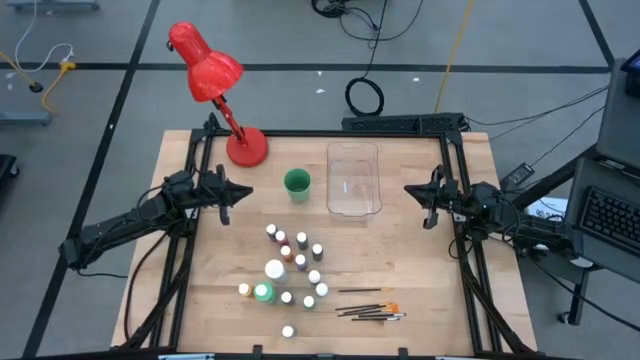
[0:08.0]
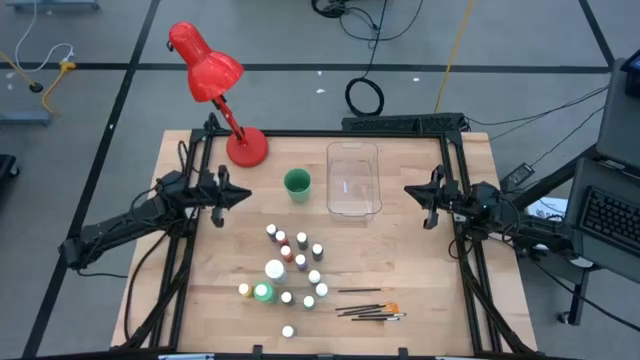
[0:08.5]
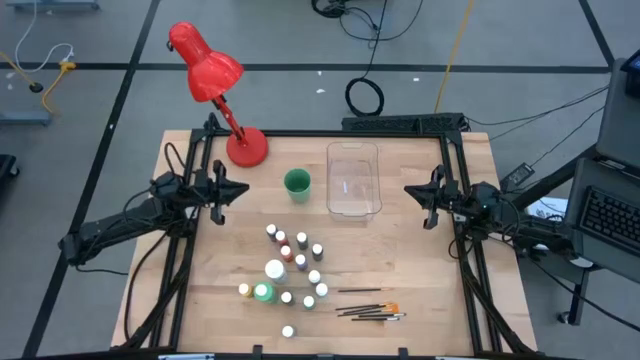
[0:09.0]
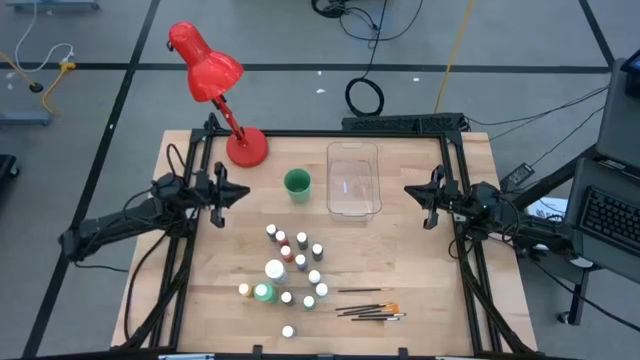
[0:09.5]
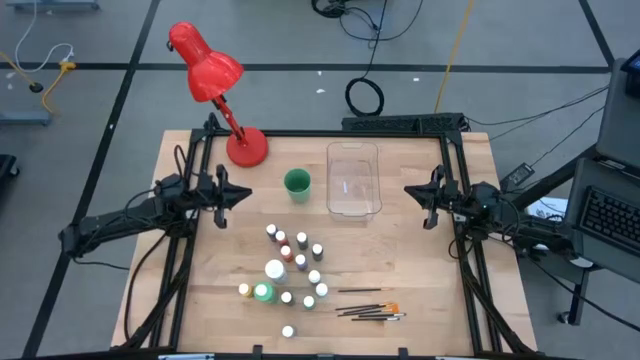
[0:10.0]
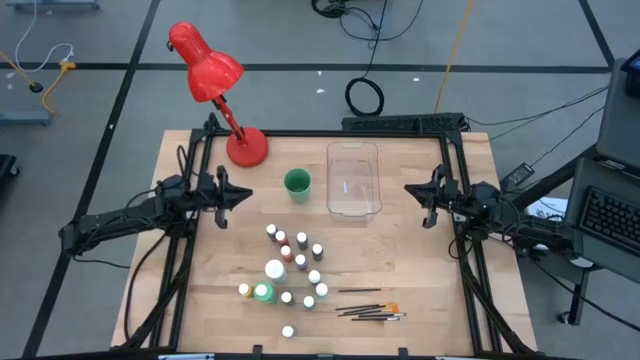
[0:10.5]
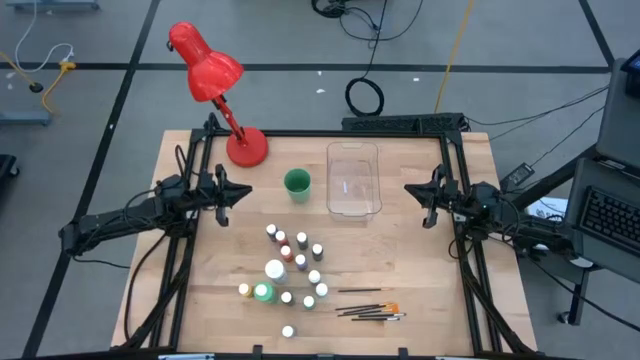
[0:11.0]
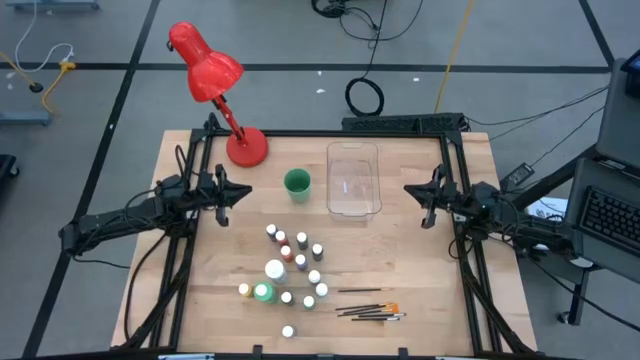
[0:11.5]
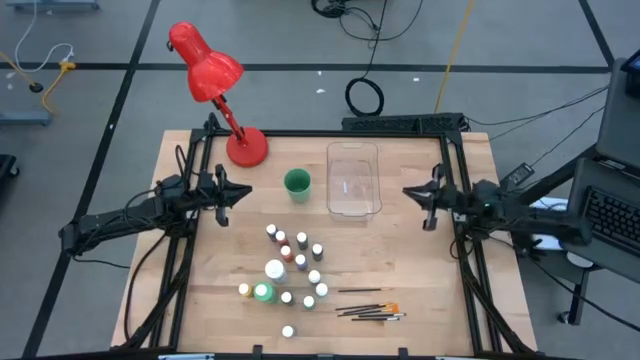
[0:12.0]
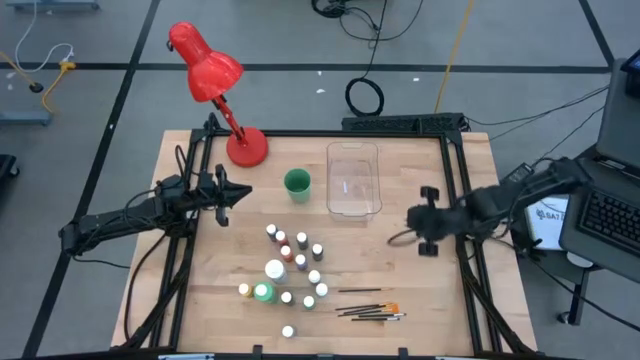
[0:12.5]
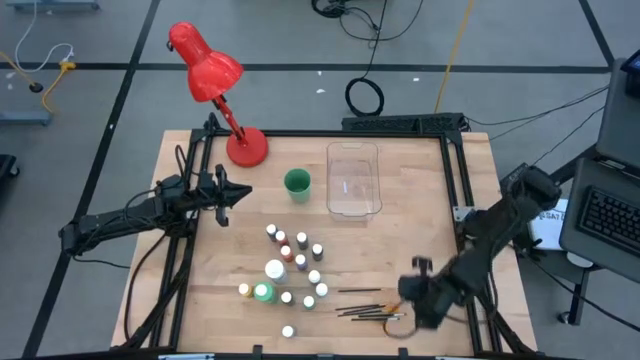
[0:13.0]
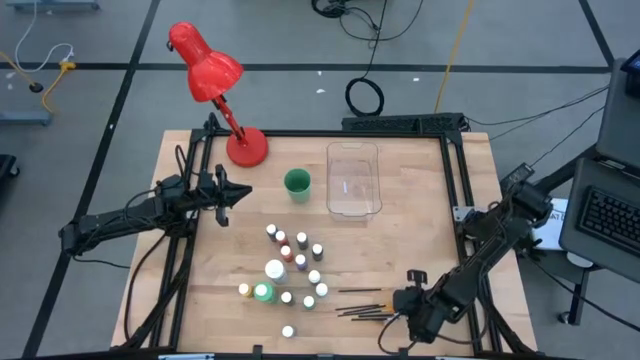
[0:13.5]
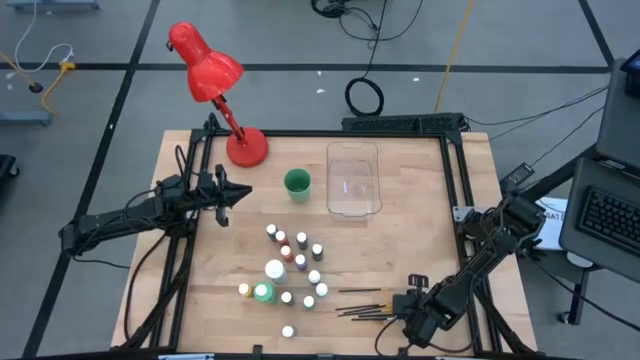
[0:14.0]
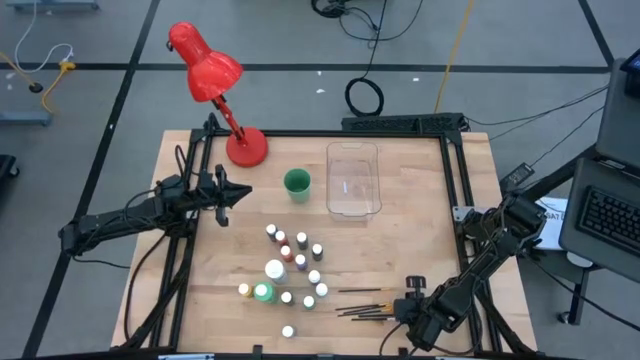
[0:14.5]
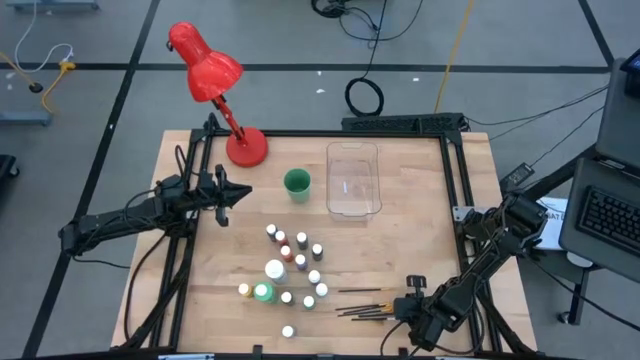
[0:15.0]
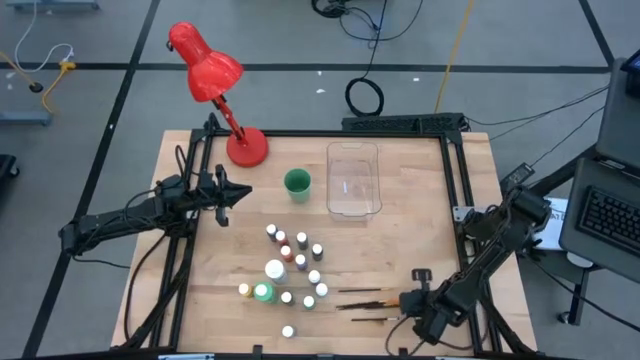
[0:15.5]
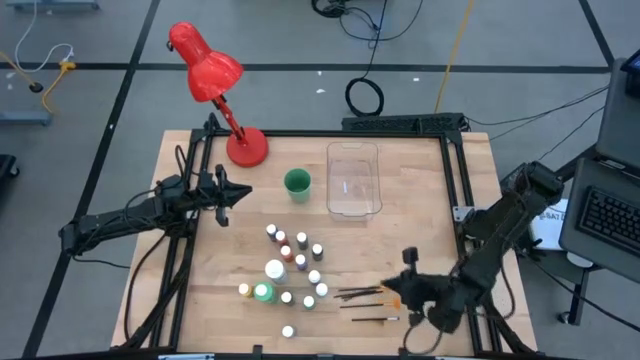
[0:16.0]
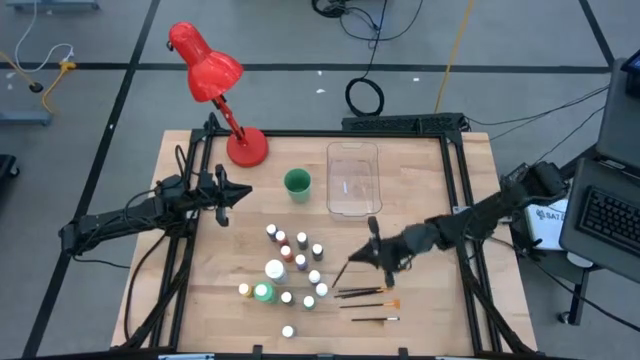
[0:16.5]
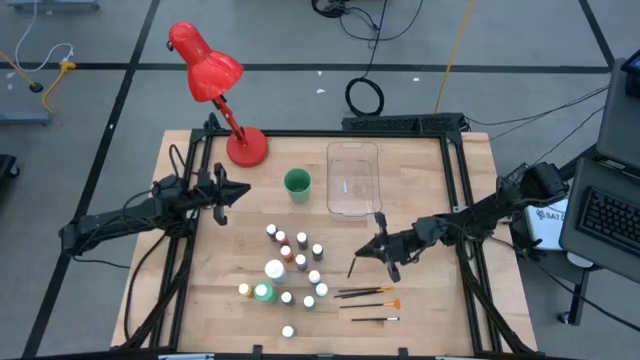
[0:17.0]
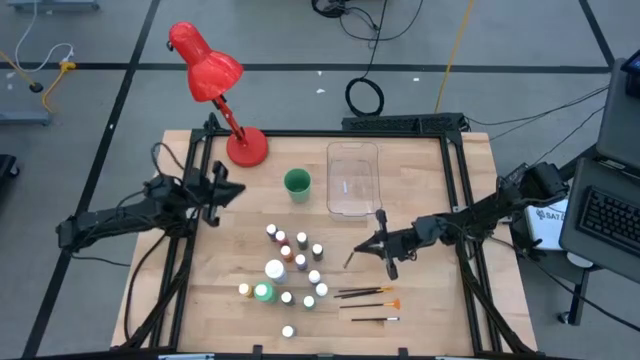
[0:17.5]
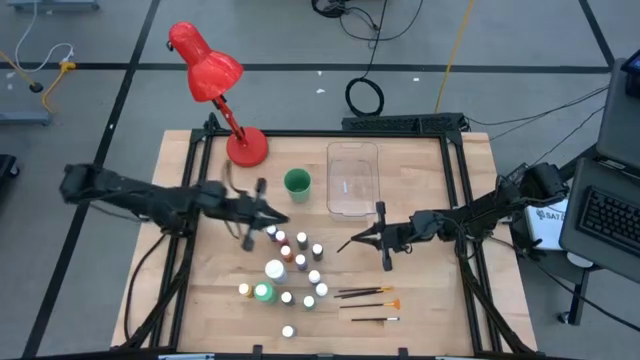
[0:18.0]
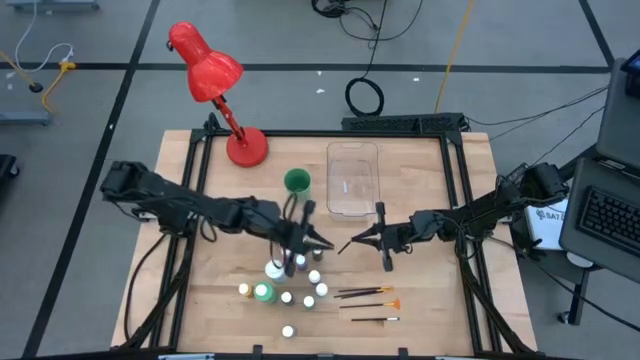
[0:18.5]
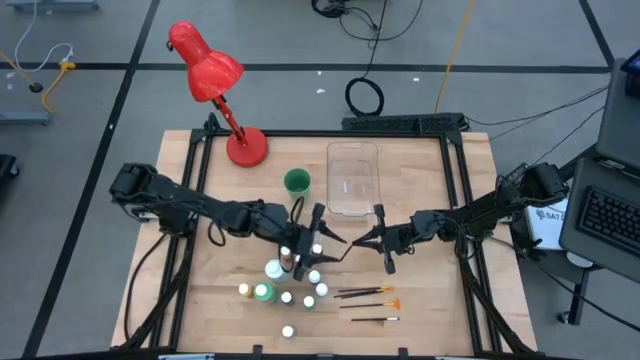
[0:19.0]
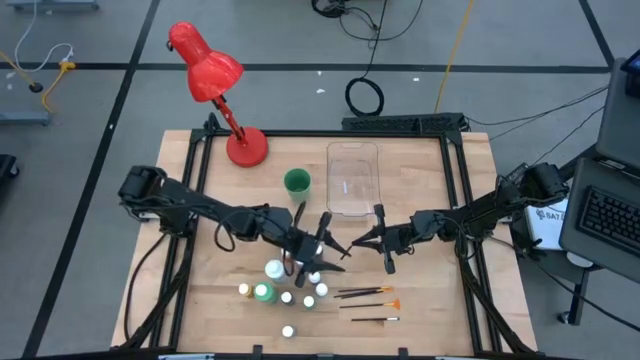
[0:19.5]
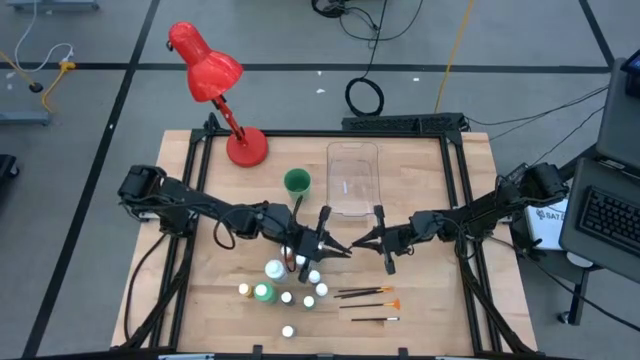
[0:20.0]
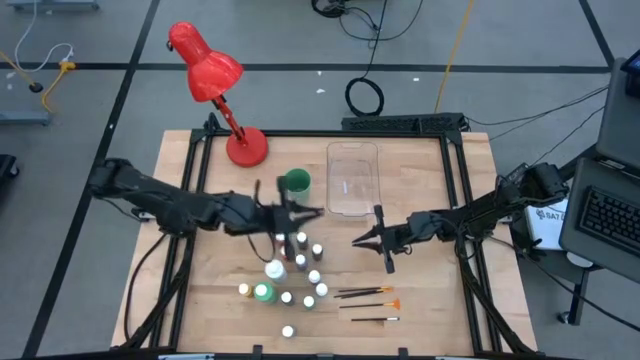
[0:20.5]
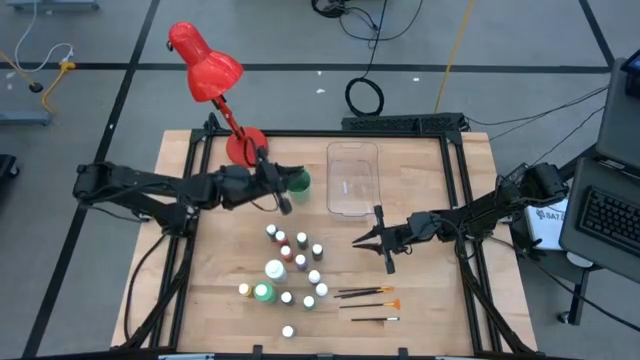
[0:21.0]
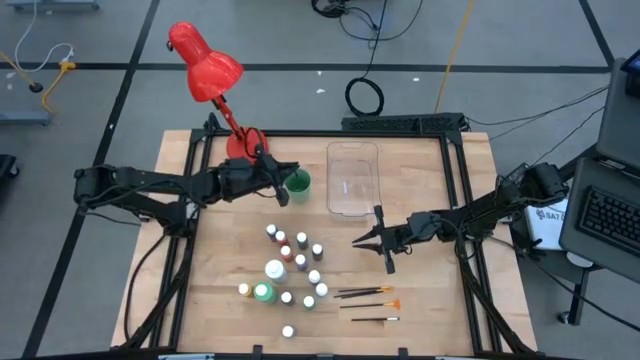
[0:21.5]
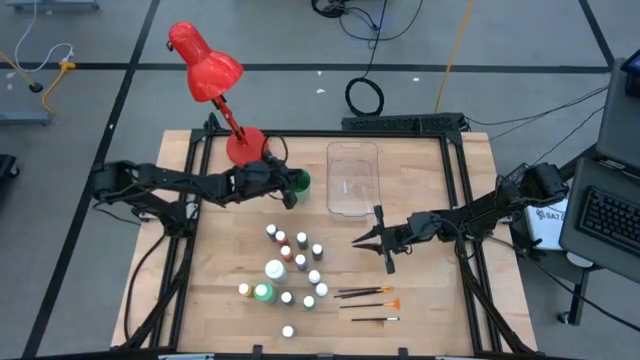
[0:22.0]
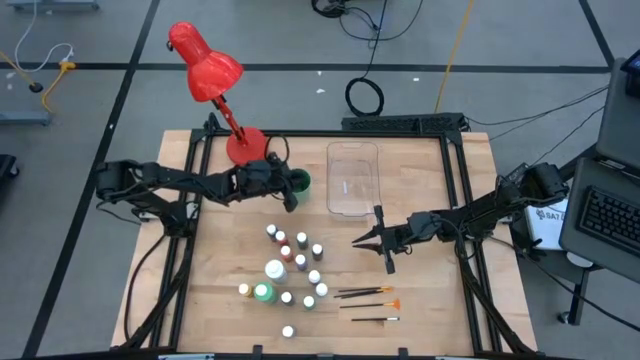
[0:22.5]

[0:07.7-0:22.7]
Task: Pick & Place Paint Supplies
Put the black paint brush into the green cup

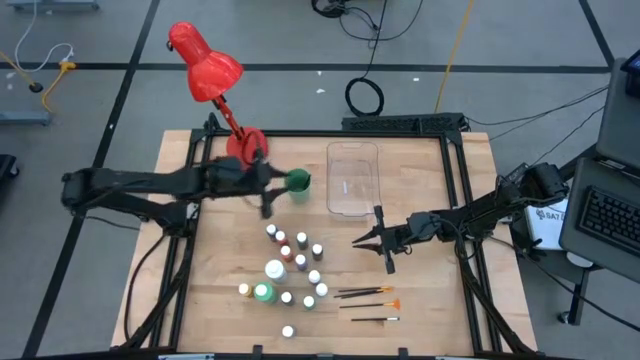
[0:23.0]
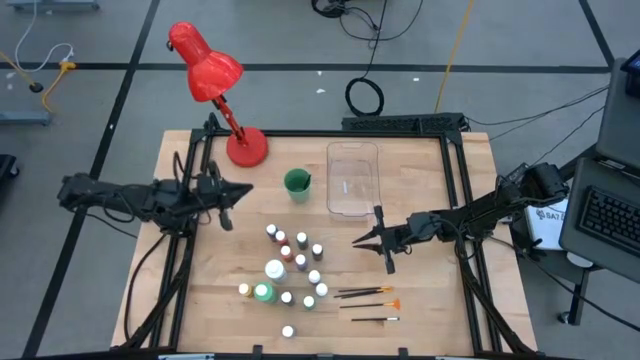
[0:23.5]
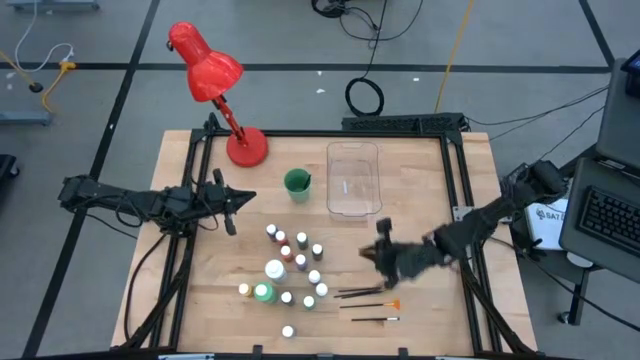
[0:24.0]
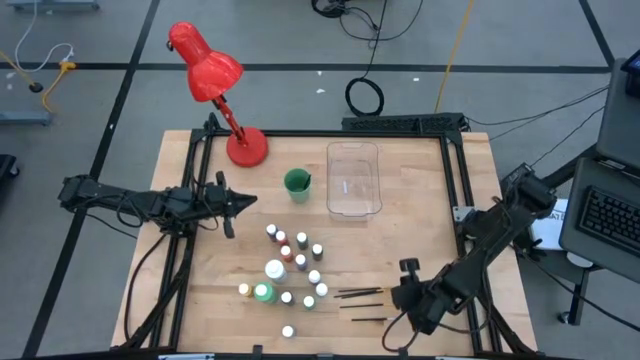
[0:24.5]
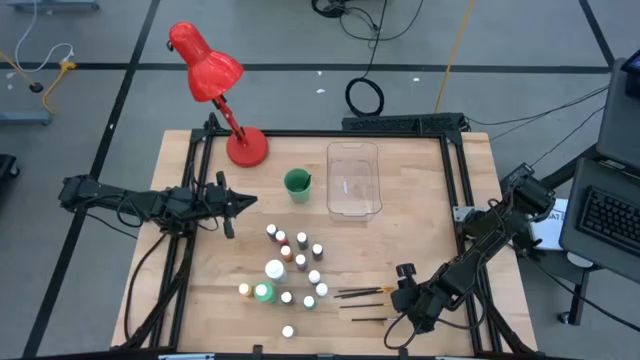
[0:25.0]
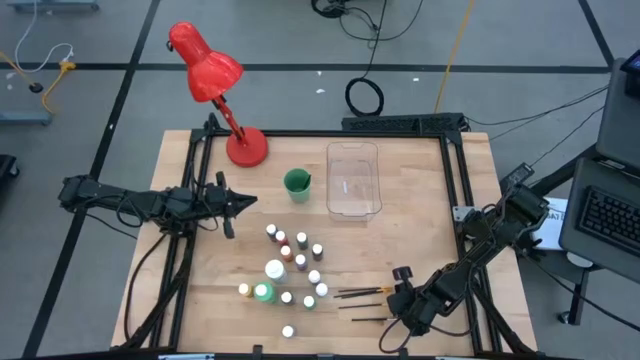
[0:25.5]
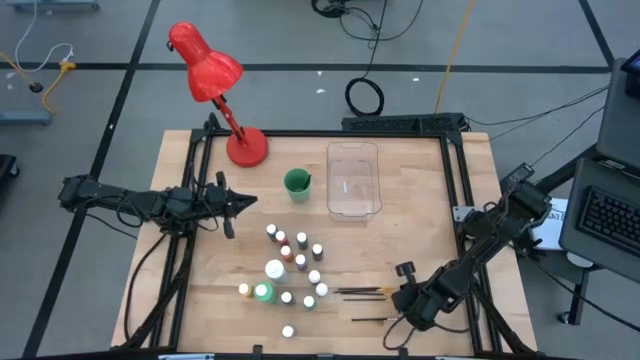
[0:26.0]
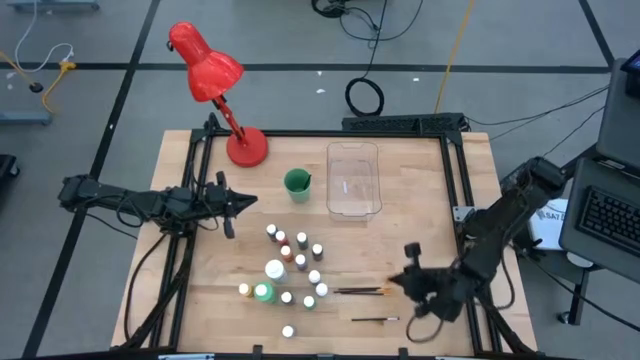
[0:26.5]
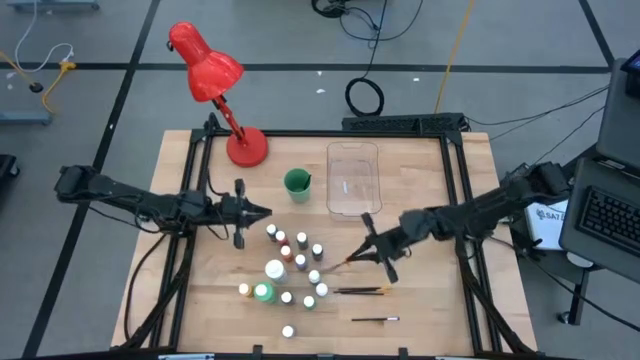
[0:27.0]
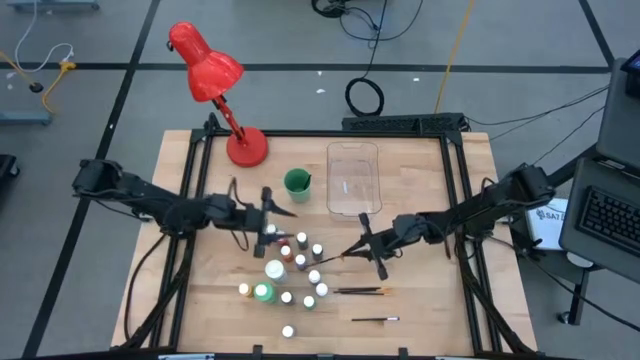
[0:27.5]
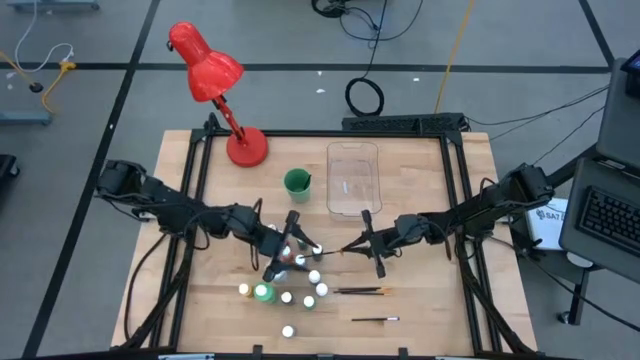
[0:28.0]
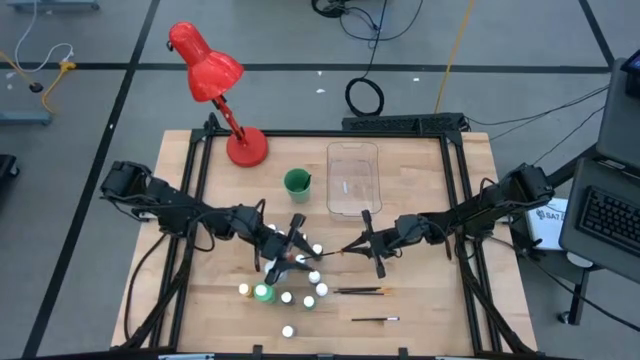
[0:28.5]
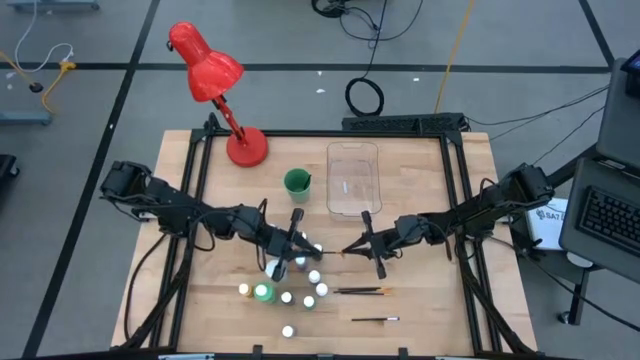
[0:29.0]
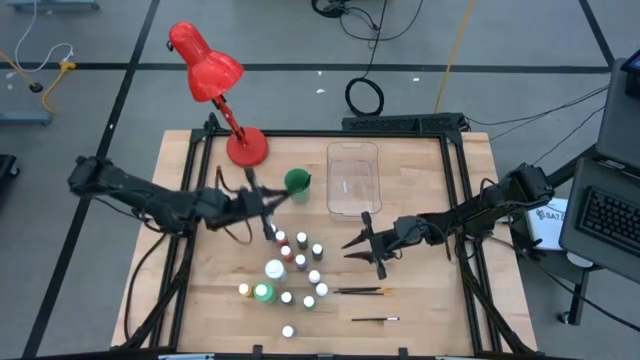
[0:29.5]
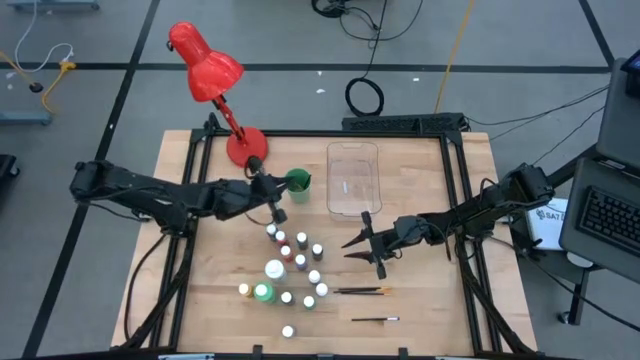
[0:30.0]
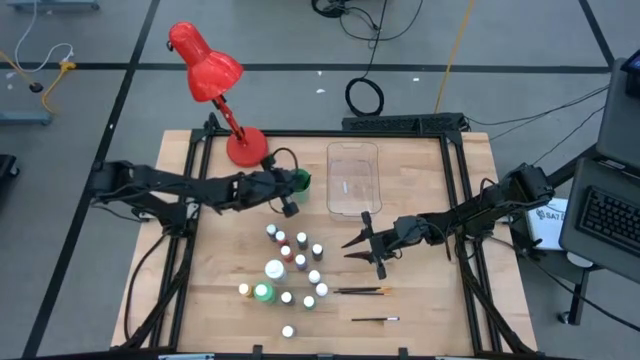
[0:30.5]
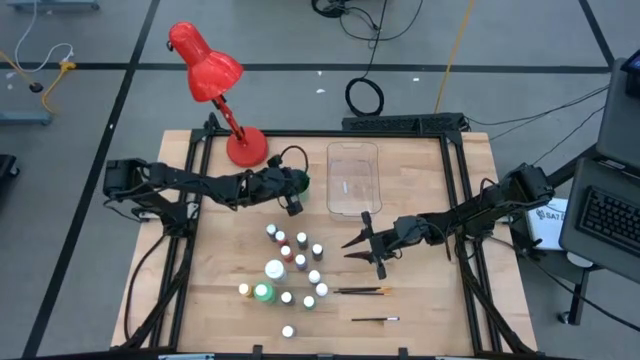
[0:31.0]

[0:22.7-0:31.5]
Put the black paint brush into the green cup
